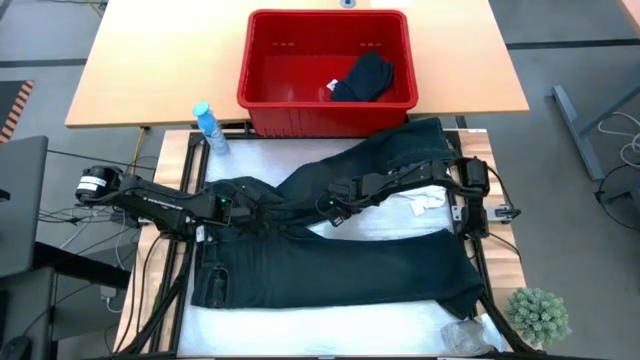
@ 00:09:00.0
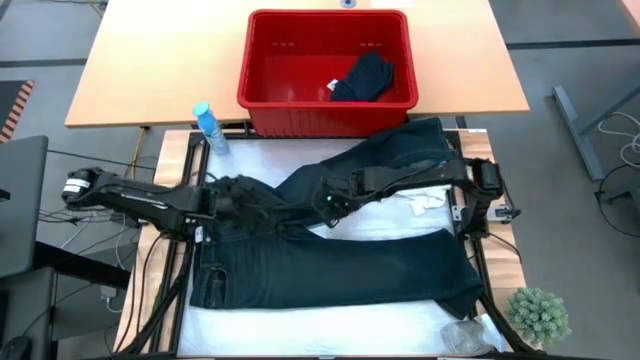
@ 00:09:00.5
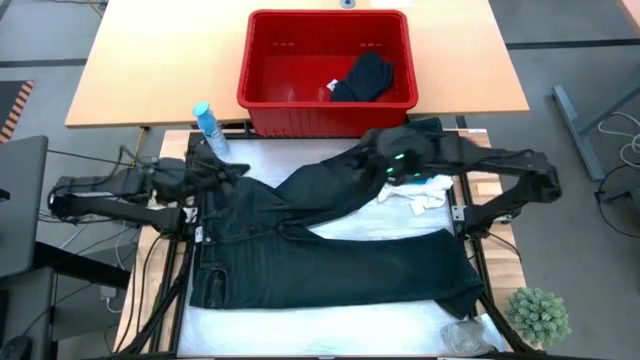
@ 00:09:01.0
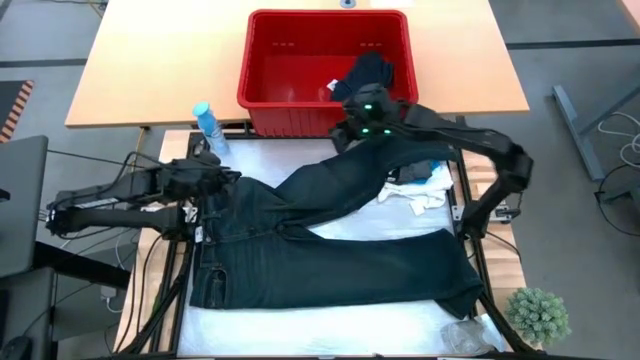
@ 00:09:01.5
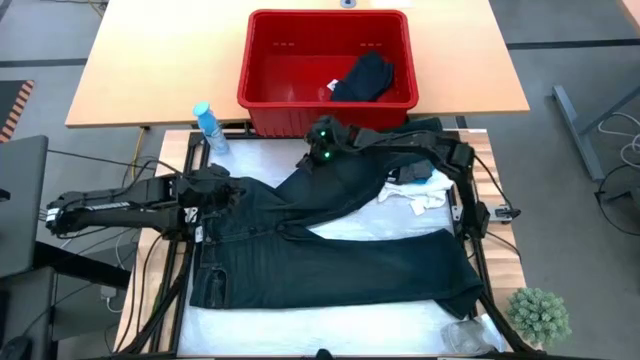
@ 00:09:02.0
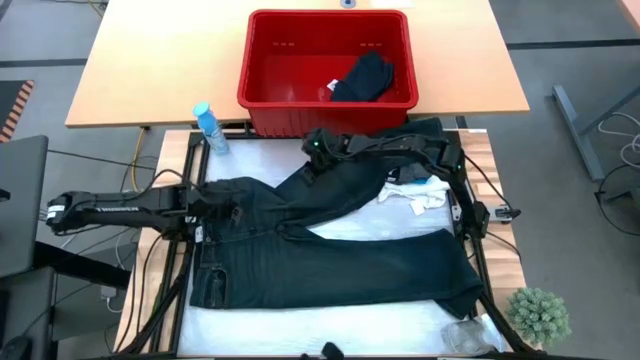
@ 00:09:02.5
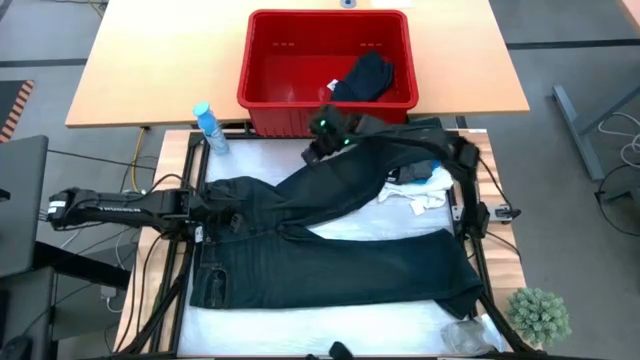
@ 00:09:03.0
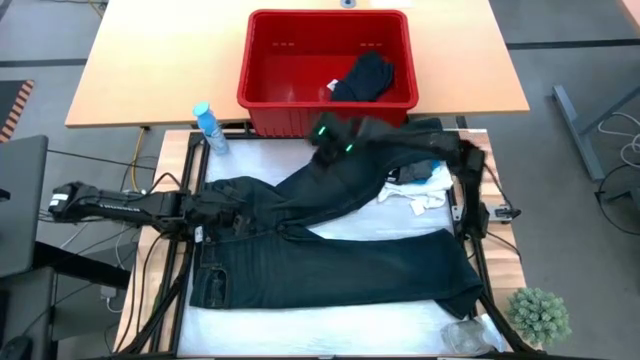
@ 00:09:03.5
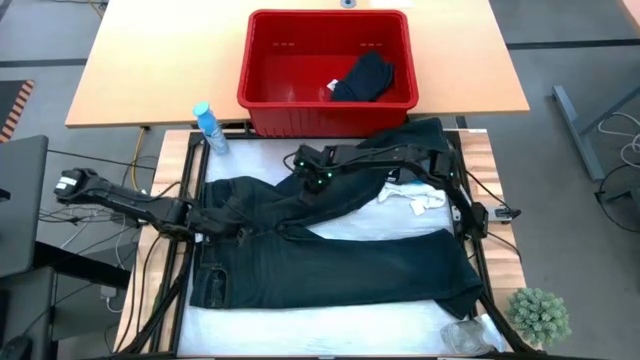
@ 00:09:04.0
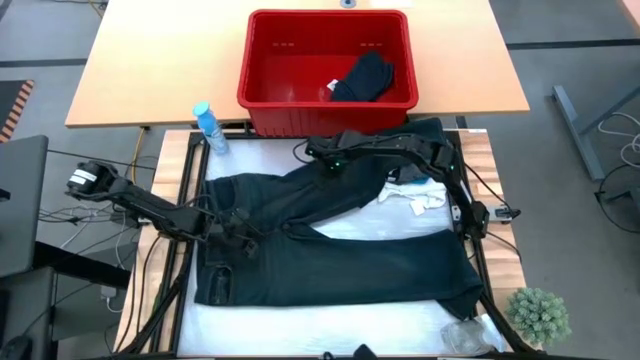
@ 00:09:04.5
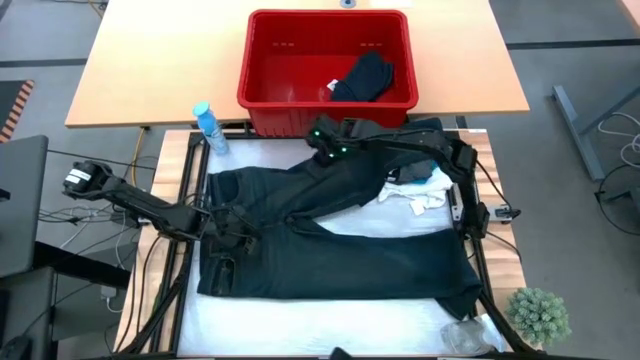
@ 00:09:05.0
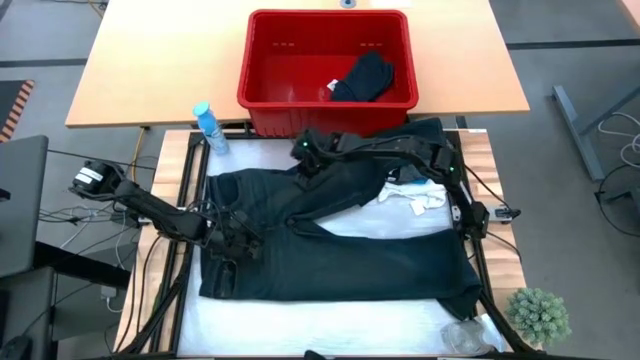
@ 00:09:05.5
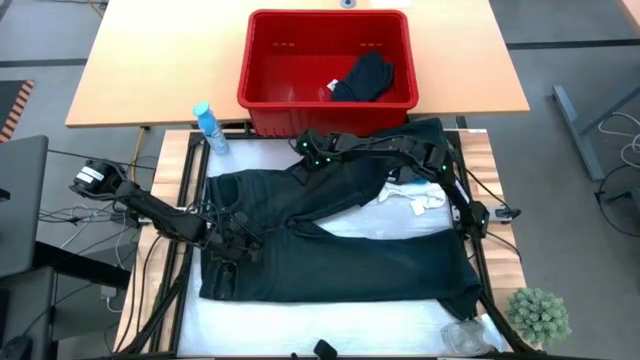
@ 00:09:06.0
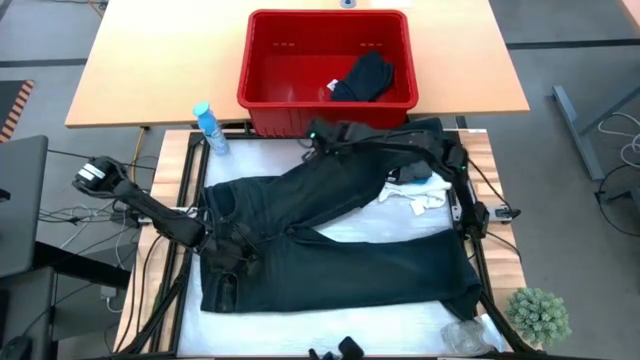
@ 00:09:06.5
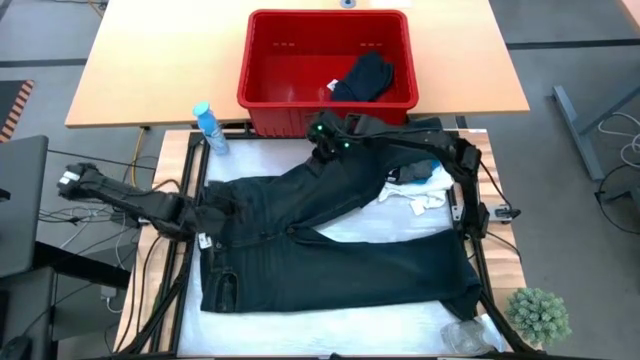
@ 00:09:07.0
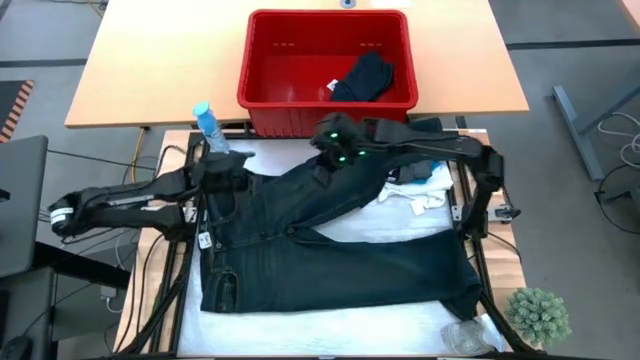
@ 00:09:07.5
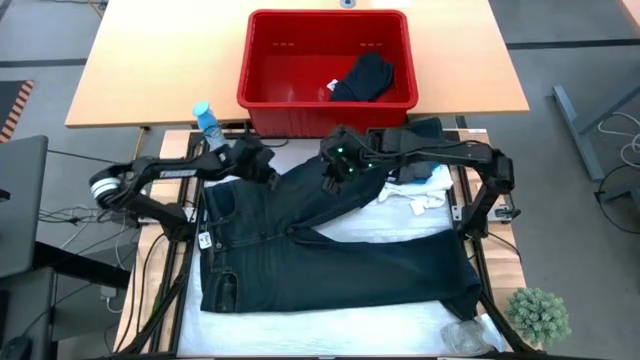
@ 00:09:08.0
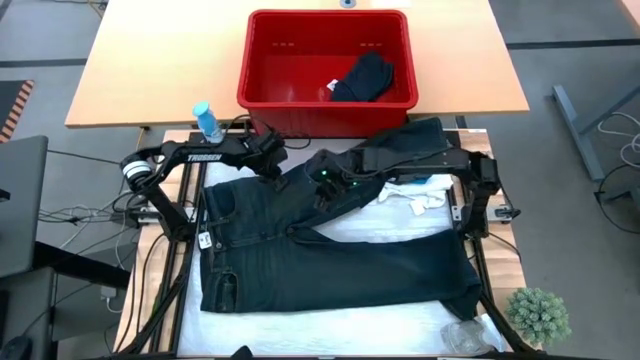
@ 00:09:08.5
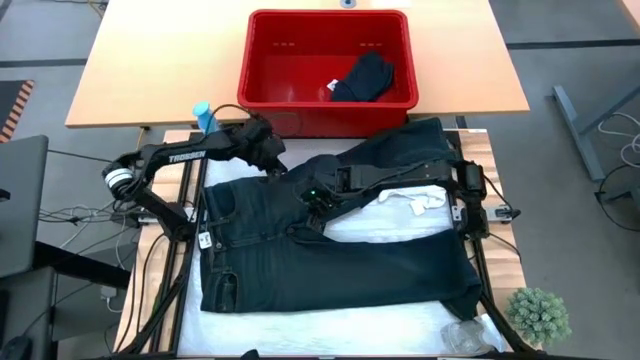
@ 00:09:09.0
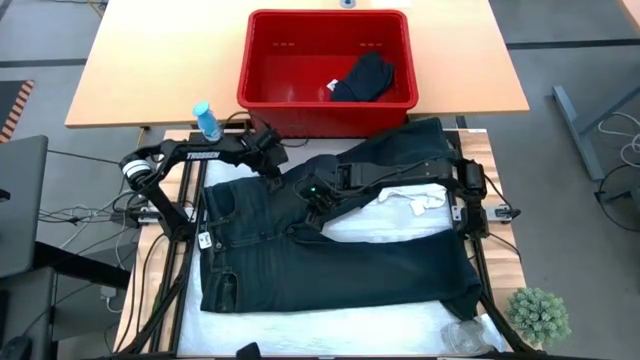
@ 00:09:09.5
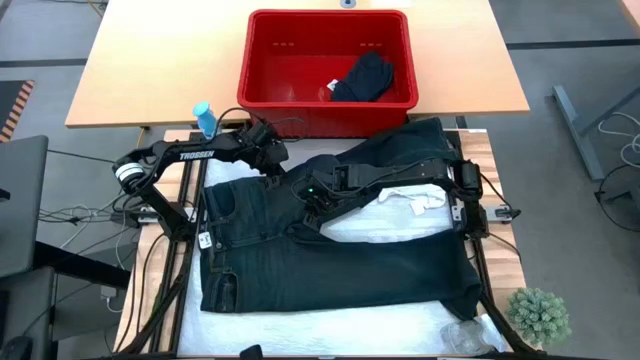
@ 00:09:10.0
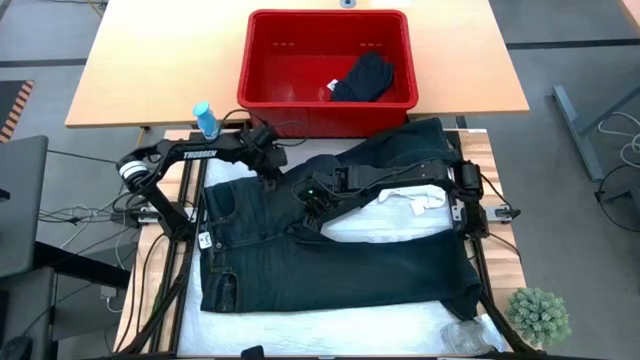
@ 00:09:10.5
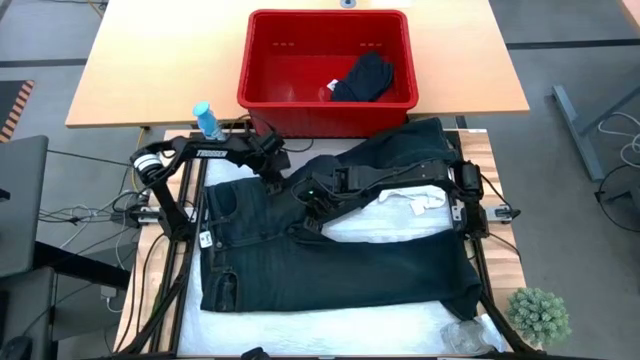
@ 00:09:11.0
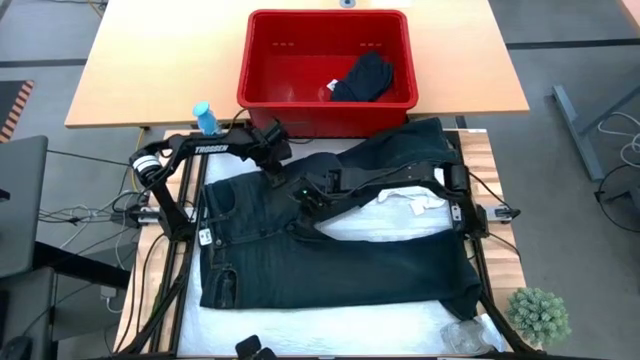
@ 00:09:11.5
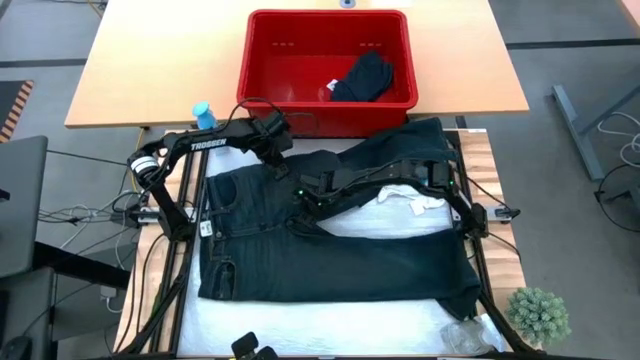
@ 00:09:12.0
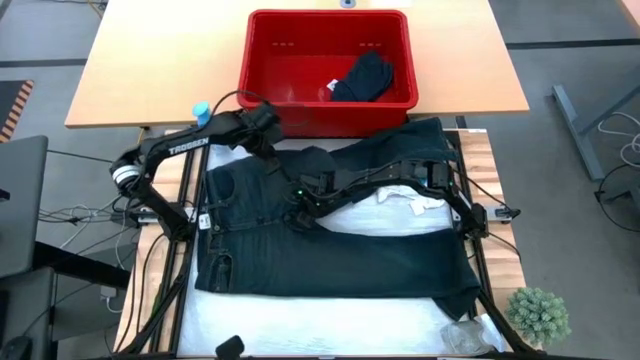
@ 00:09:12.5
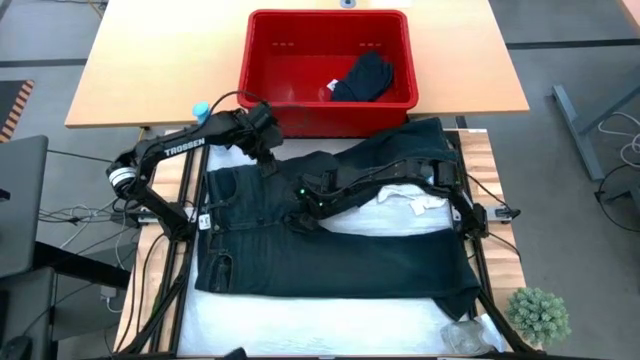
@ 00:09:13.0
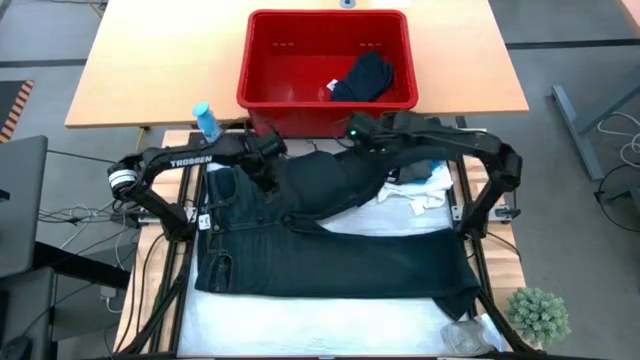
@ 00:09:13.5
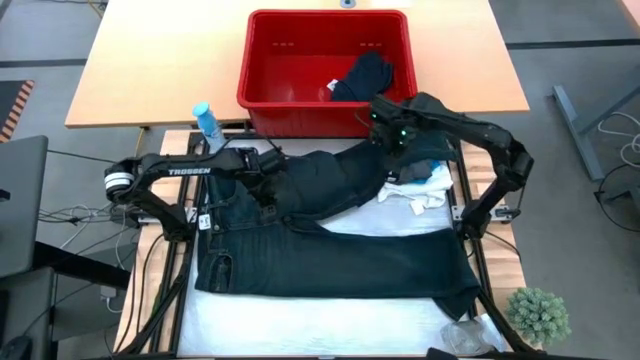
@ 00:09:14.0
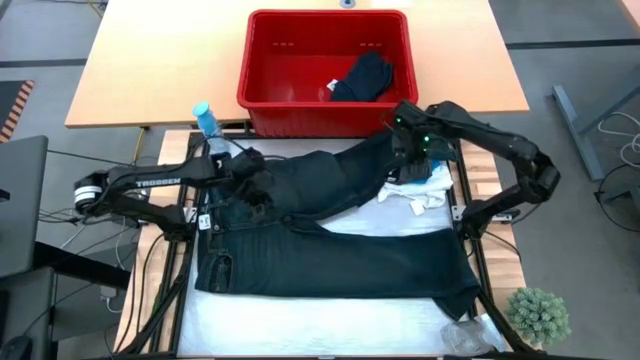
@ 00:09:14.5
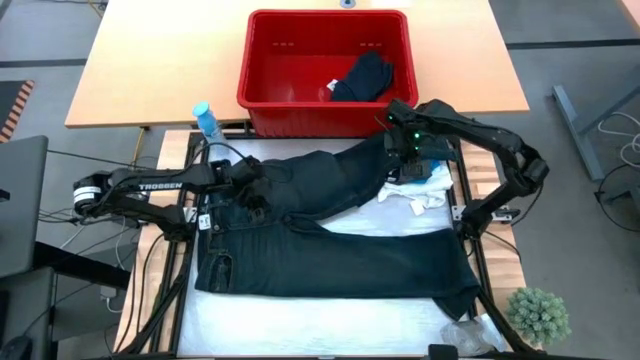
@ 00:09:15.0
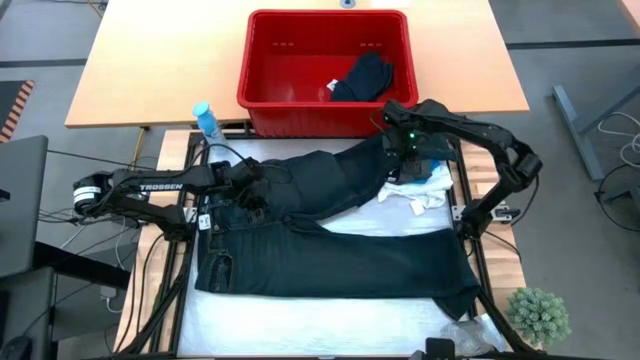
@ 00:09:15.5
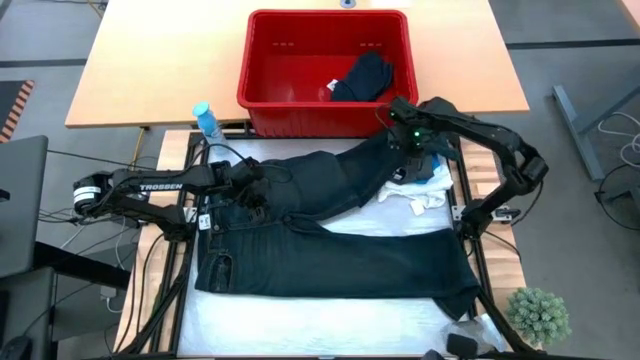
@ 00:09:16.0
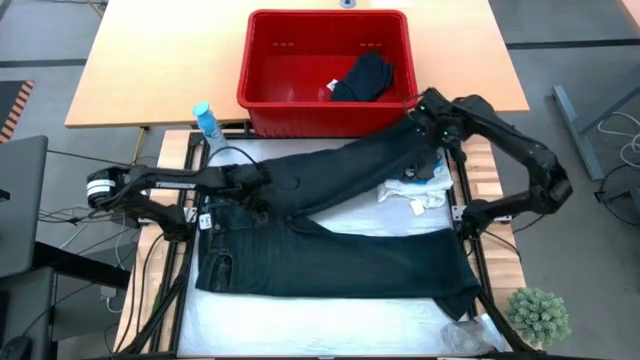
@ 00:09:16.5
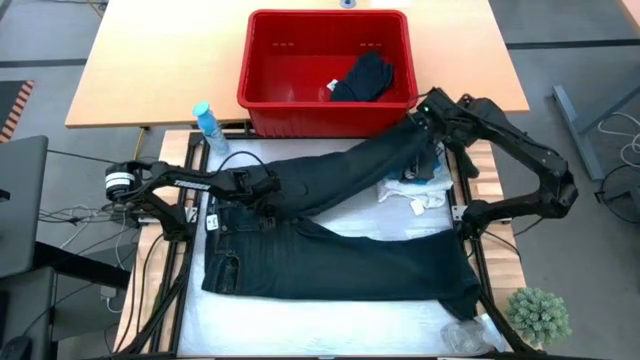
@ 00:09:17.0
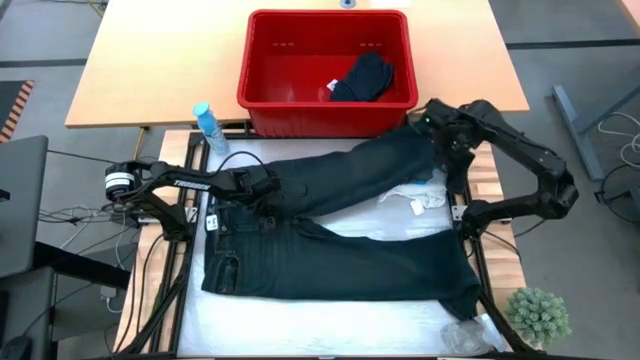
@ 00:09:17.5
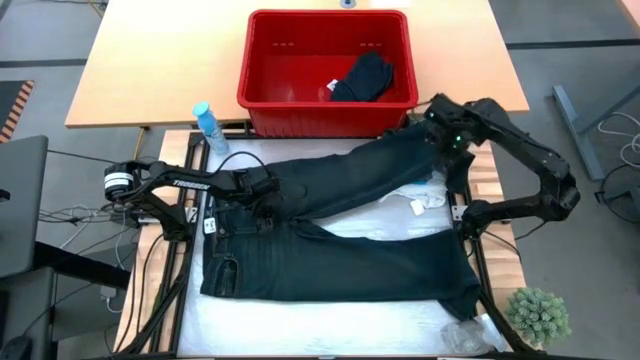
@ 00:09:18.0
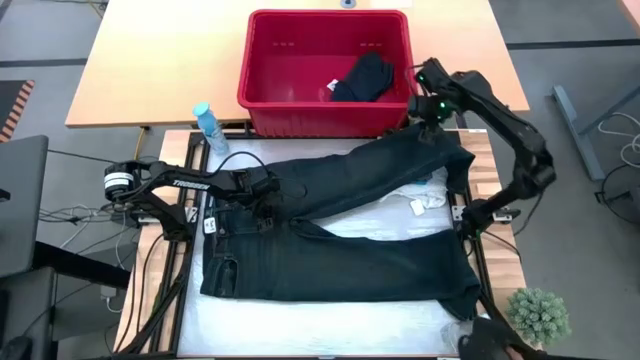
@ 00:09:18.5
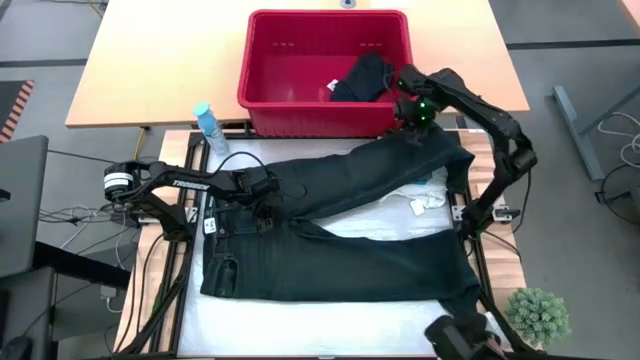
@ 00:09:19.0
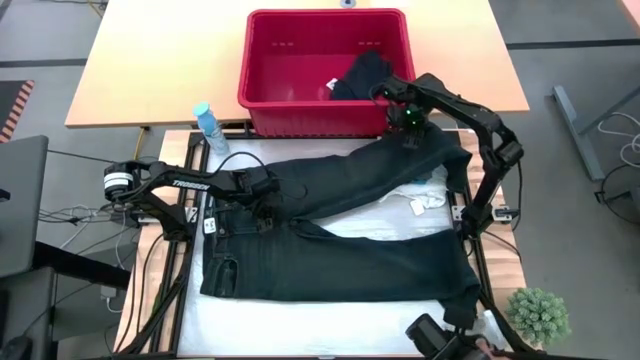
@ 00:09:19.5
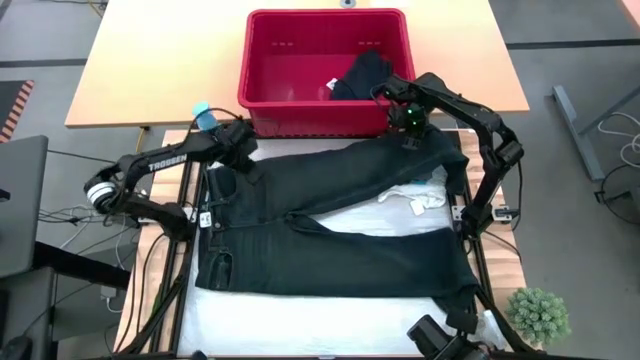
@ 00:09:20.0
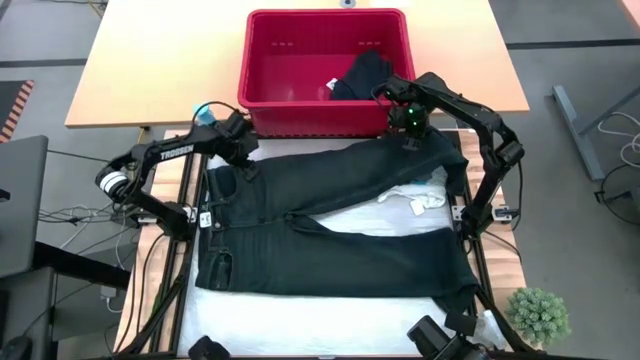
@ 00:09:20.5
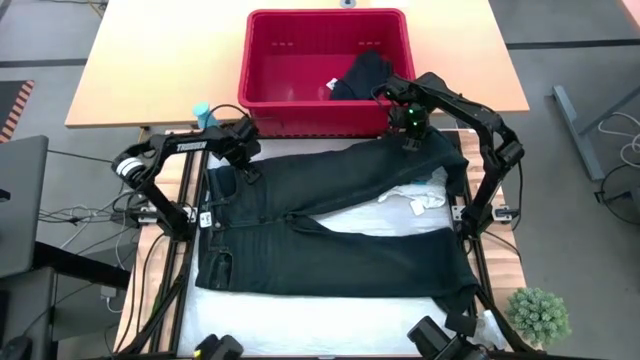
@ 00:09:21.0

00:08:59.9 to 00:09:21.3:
Task: Fold laundry
Fold the blue pants

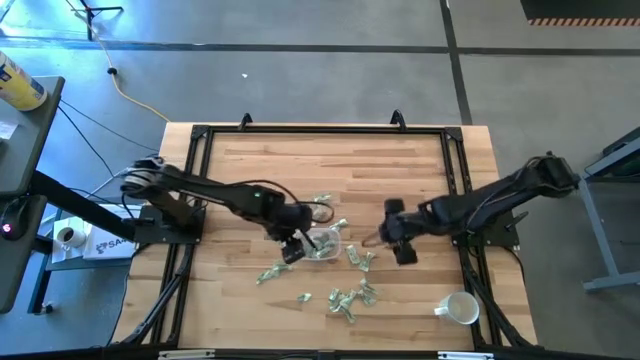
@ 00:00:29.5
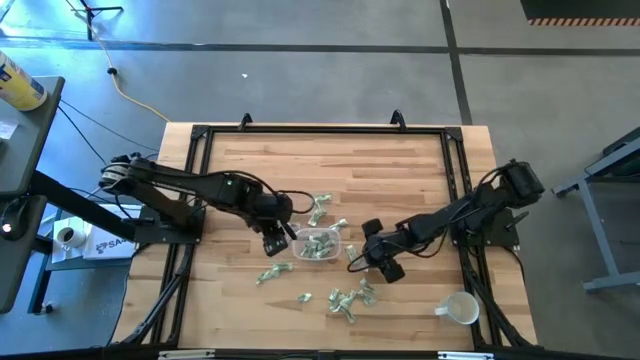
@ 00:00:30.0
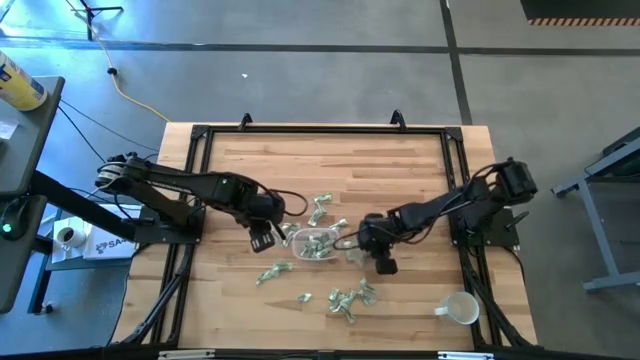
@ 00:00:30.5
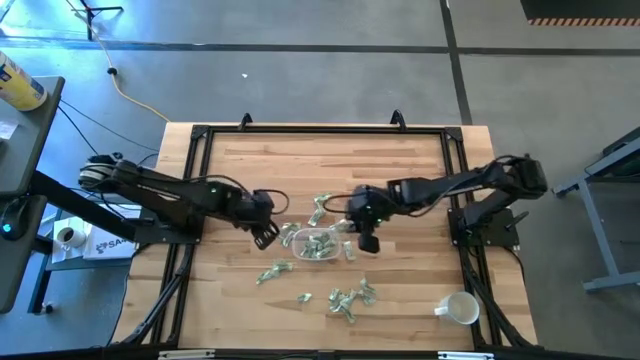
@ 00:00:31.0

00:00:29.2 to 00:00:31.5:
Task: Pick and place Stevia / Truvia into bins
Put the green stevia packet into the transparent bin
